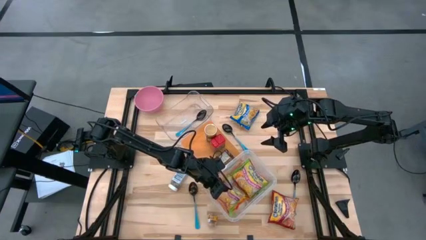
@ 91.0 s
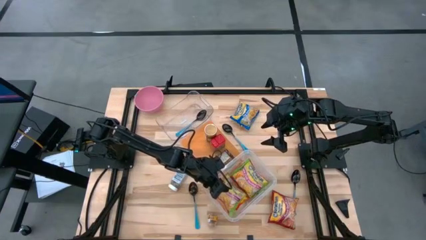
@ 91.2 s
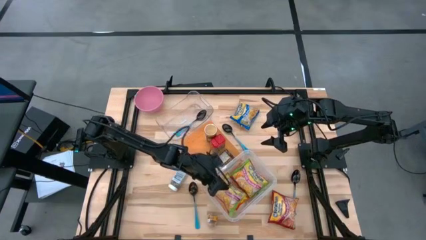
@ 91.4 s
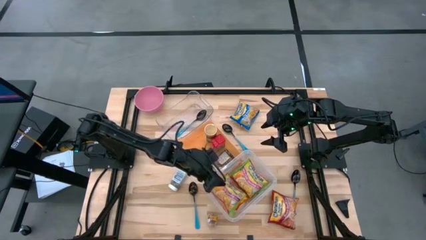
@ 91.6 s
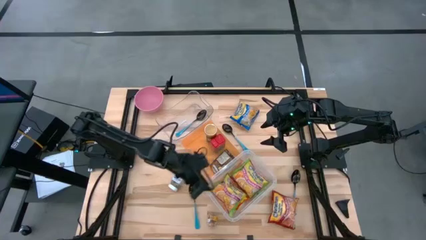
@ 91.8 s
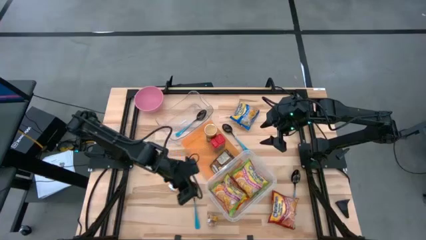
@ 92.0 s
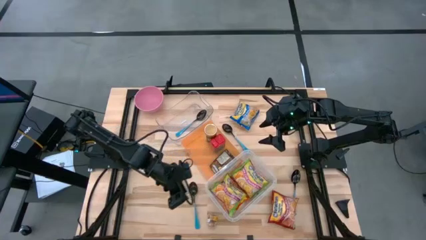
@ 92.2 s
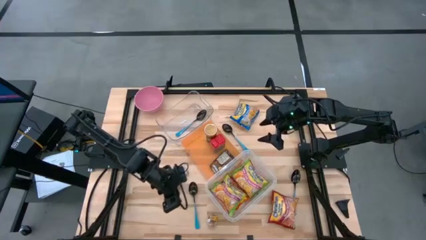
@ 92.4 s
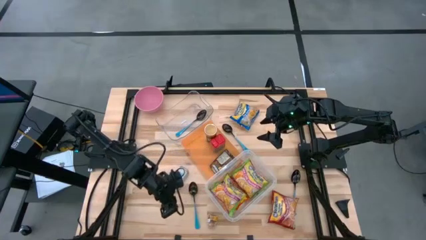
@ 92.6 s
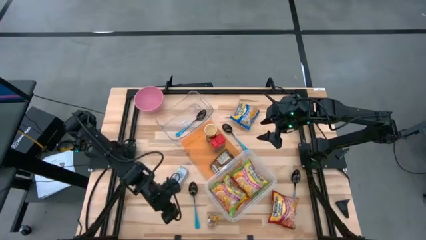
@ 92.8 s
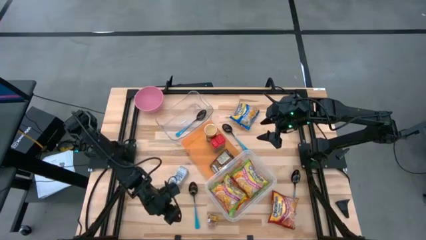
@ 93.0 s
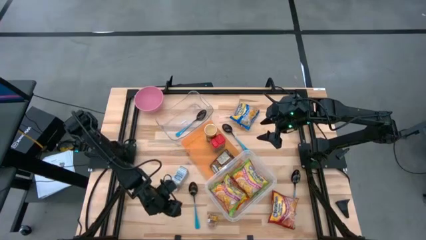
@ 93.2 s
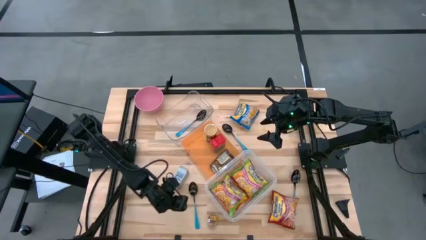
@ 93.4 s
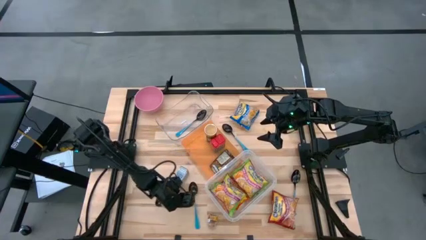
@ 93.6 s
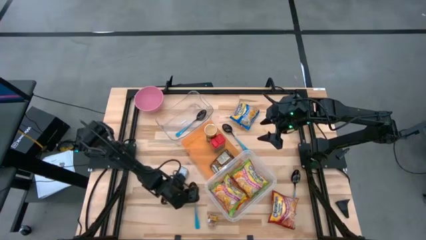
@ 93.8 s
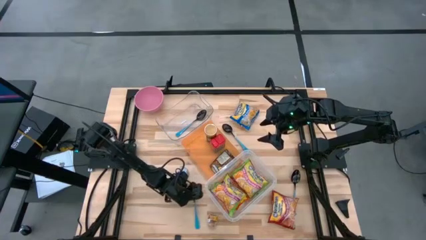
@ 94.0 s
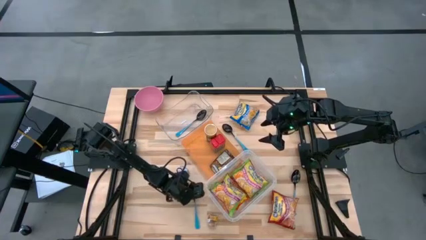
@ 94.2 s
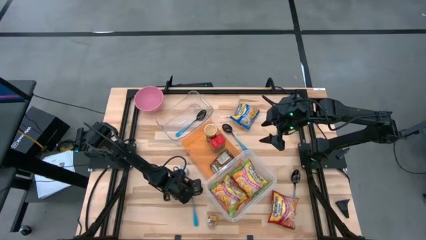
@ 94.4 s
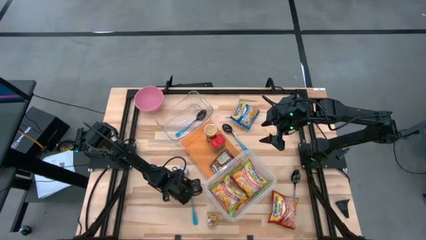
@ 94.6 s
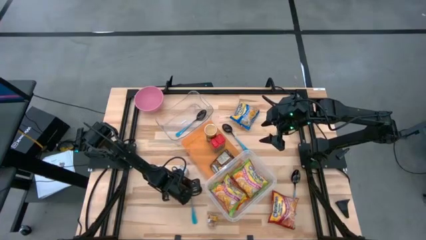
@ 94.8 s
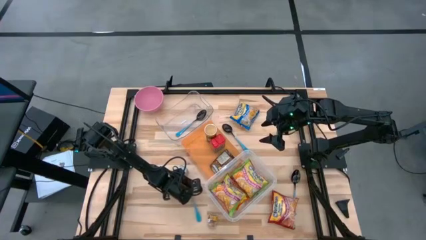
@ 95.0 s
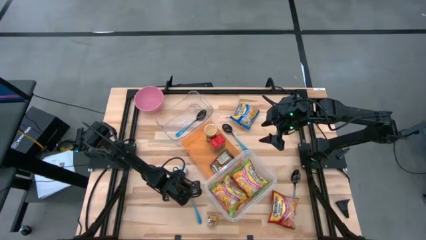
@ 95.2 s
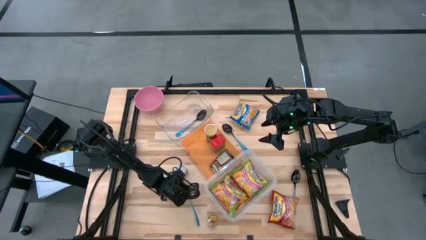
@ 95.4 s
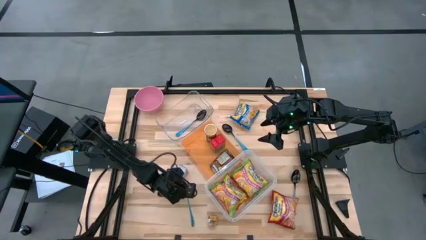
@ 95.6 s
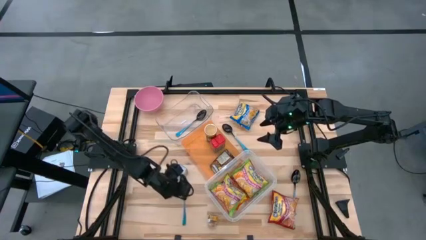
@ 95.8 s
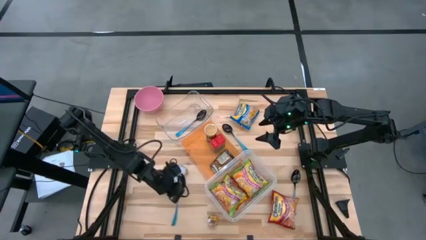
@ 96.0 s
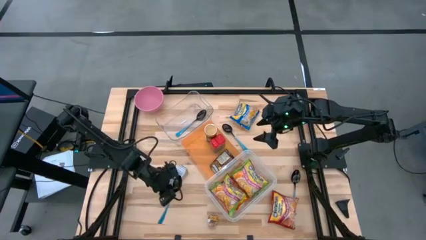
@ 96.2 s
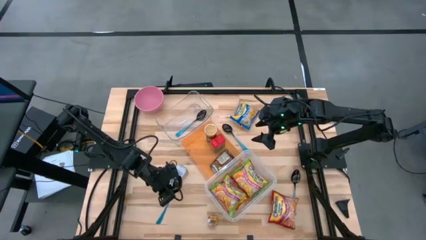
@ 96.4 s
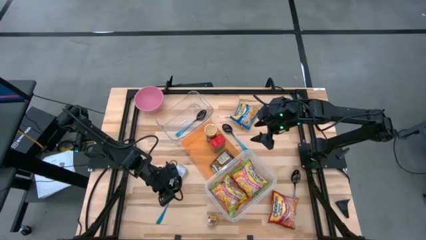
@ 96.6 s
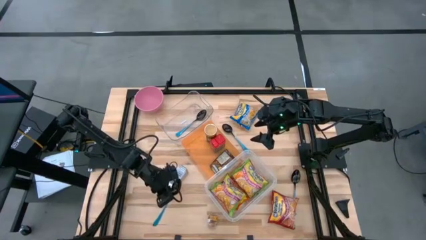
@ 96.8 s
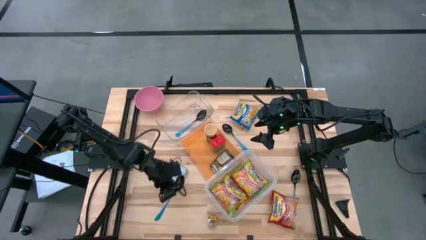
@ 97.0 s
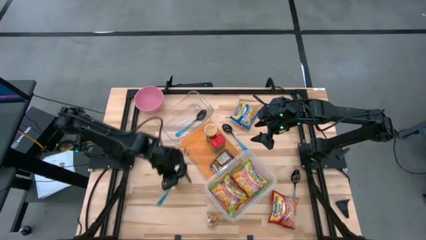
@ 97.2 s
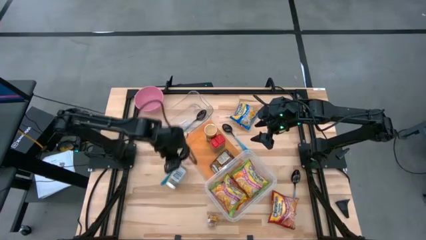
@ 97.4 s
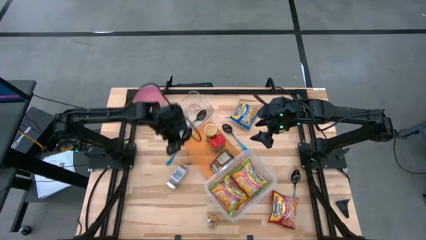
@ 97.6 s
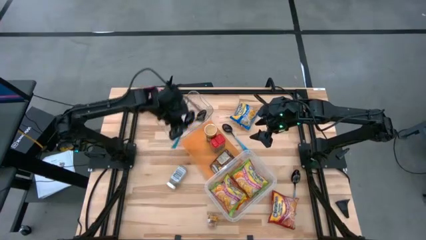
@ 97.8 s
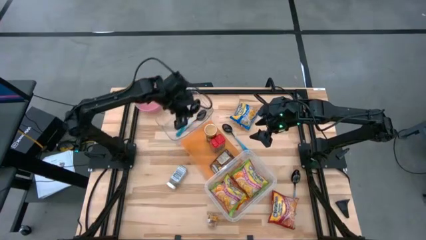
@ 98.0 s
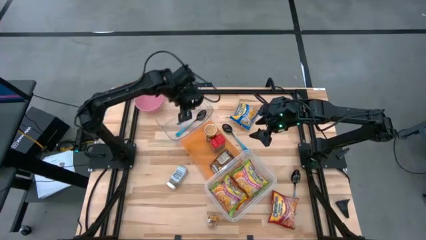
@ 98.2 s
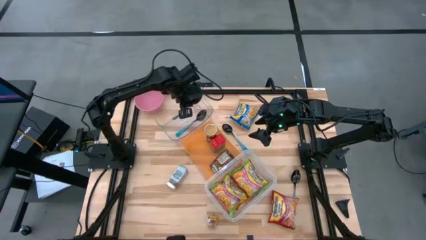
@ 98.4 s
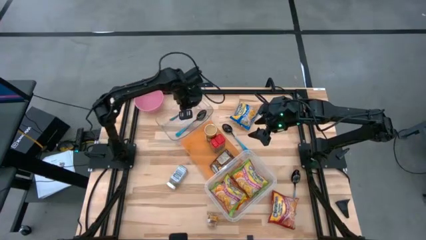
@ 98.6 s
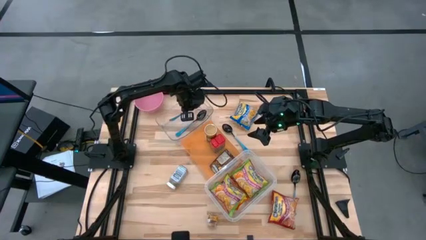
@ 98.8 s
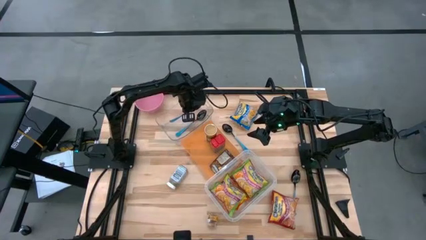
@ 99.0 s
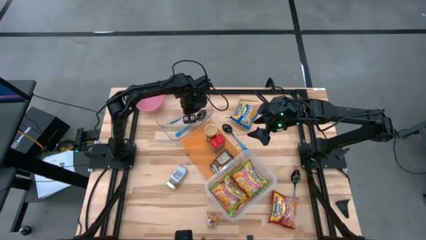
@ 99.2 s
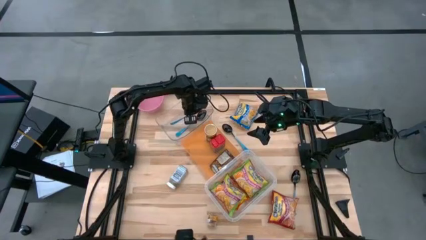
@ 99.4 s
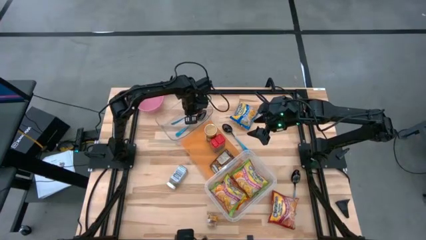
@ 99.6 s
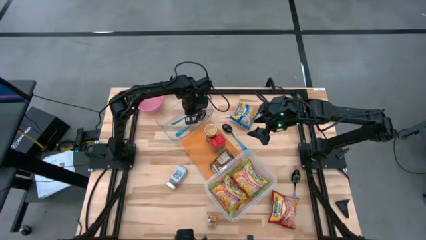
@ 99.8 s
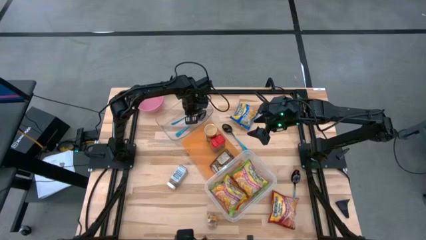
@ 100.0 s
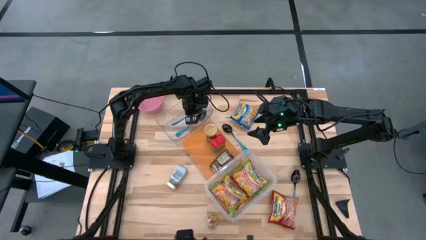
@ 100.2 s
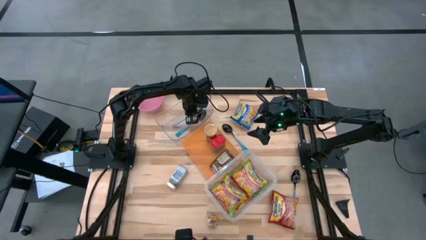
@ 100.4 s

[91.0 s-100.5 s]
Task: Pick & Place Food Item
Put the blue spoon into the top transparent bin

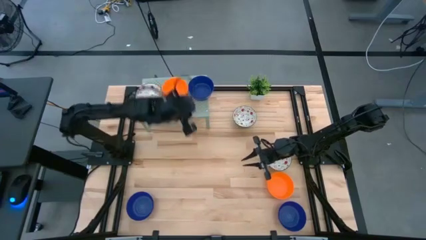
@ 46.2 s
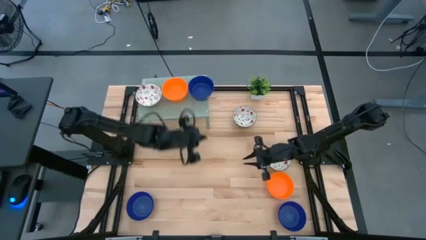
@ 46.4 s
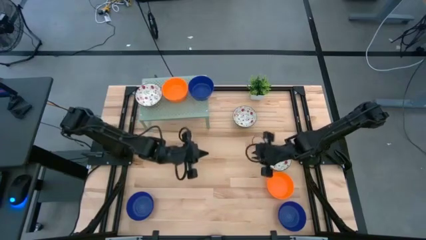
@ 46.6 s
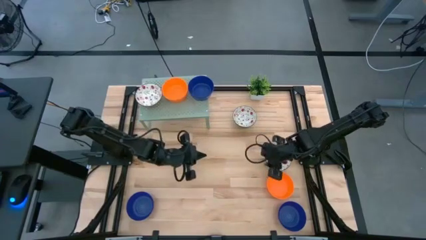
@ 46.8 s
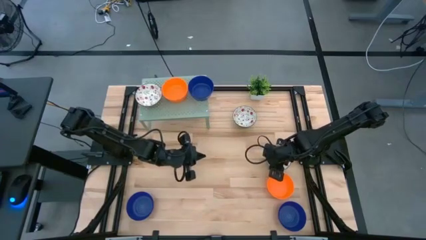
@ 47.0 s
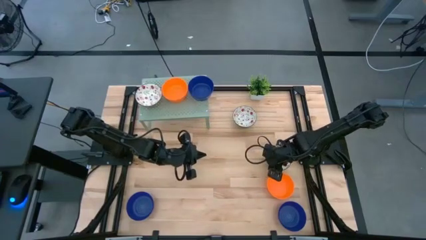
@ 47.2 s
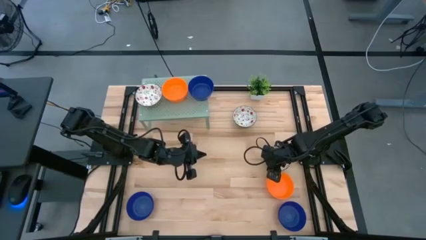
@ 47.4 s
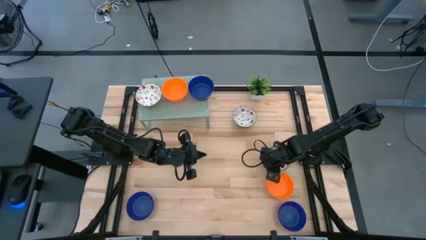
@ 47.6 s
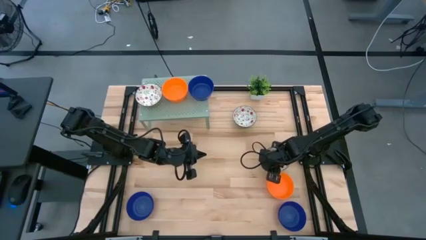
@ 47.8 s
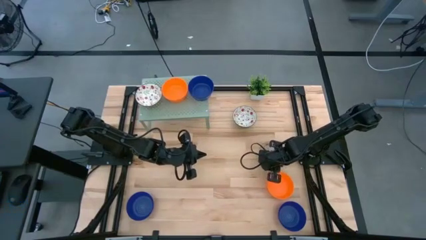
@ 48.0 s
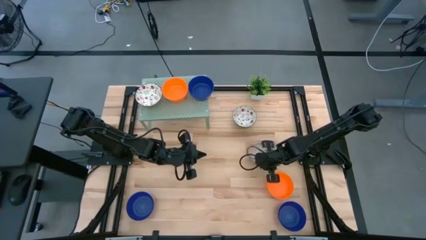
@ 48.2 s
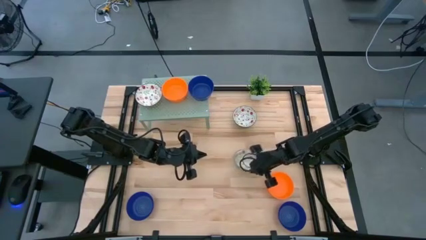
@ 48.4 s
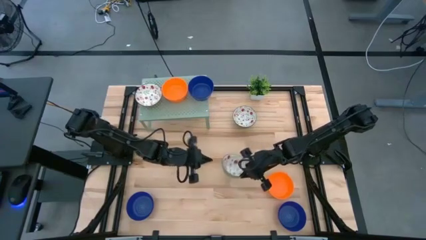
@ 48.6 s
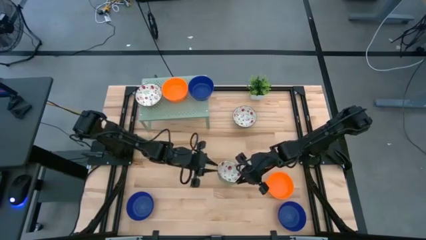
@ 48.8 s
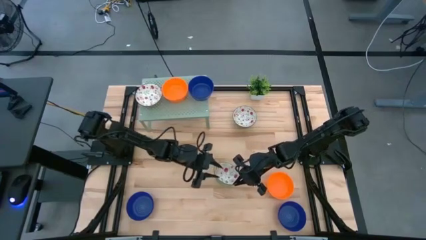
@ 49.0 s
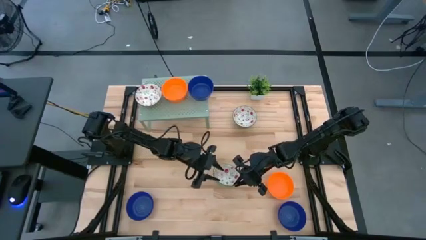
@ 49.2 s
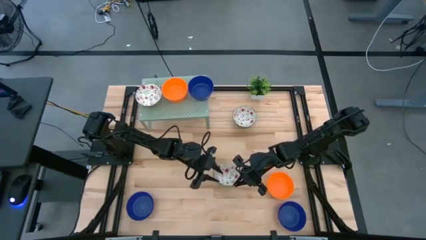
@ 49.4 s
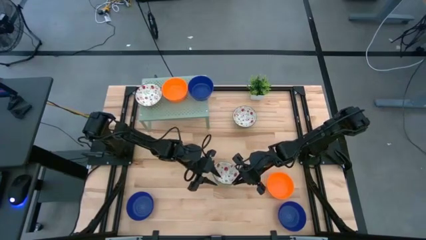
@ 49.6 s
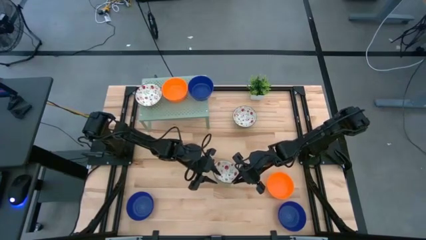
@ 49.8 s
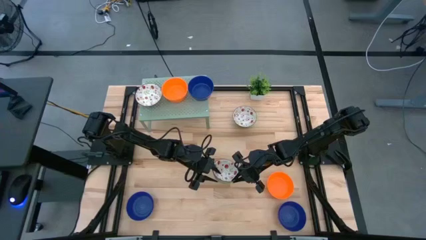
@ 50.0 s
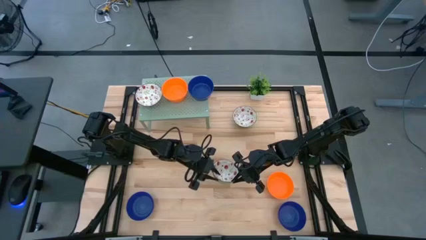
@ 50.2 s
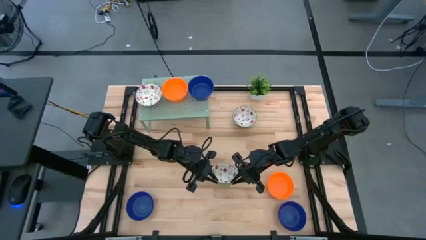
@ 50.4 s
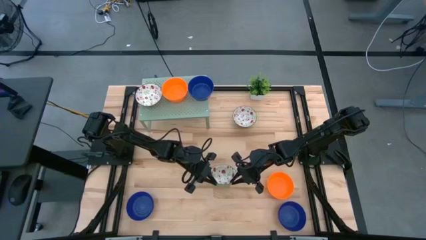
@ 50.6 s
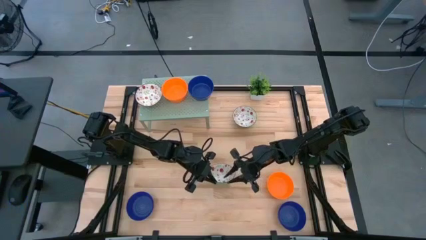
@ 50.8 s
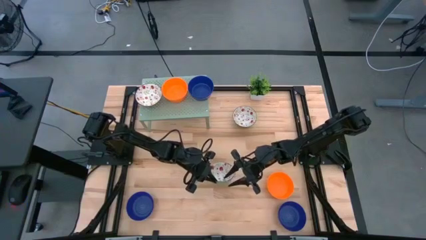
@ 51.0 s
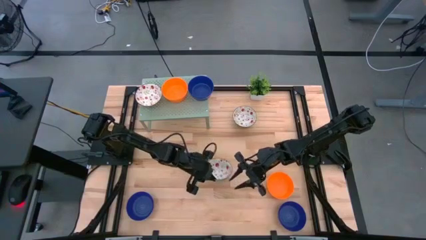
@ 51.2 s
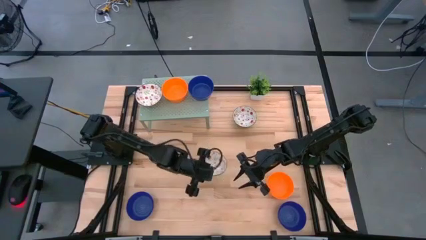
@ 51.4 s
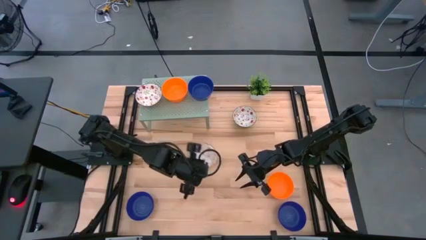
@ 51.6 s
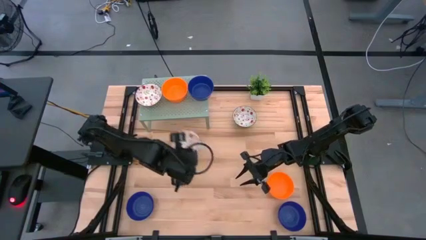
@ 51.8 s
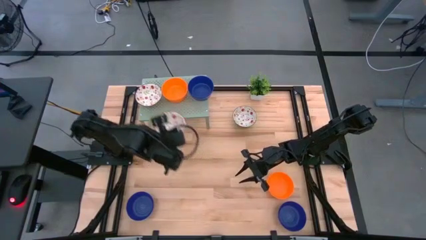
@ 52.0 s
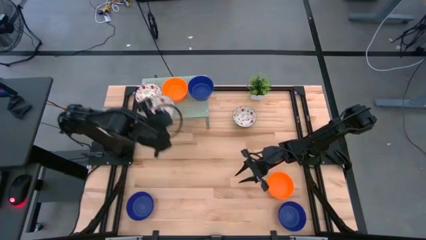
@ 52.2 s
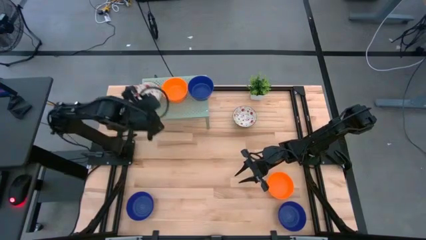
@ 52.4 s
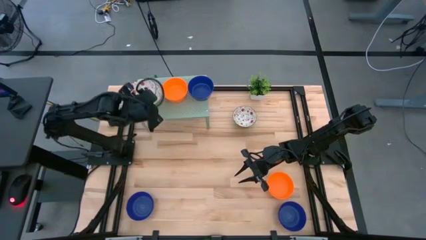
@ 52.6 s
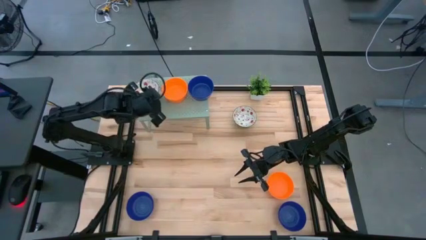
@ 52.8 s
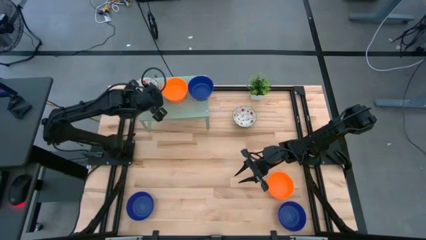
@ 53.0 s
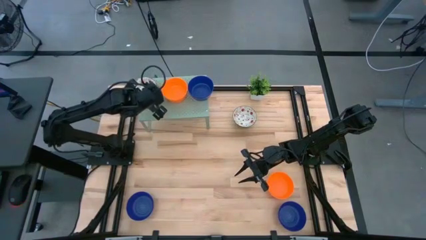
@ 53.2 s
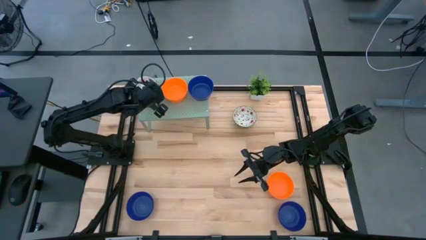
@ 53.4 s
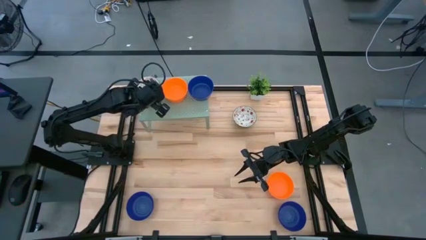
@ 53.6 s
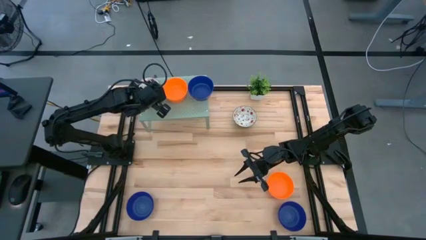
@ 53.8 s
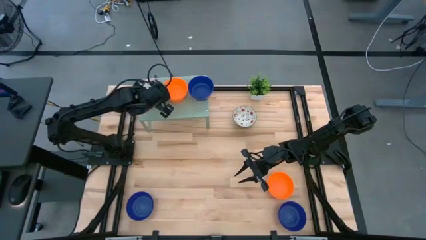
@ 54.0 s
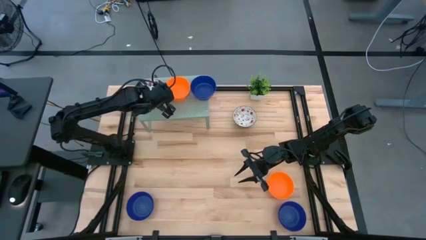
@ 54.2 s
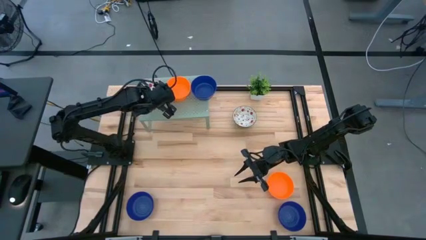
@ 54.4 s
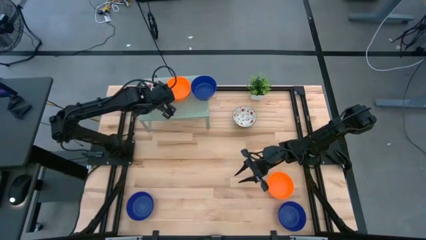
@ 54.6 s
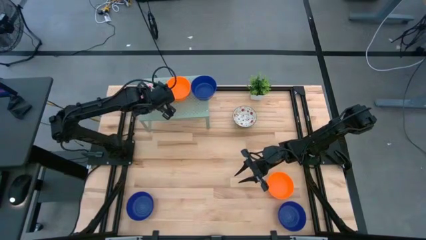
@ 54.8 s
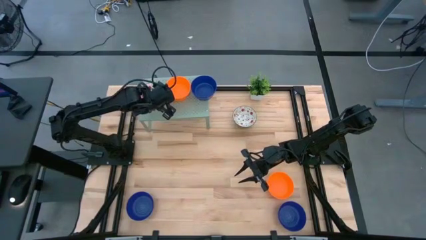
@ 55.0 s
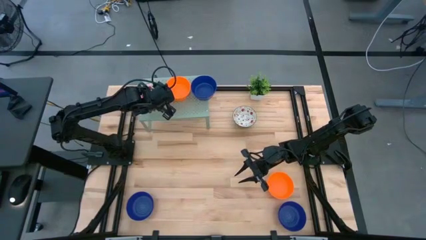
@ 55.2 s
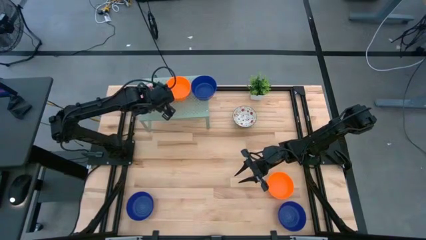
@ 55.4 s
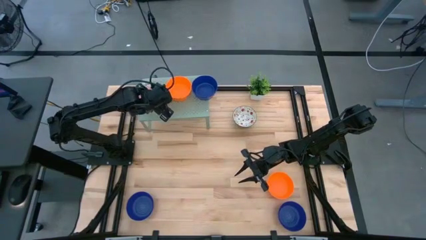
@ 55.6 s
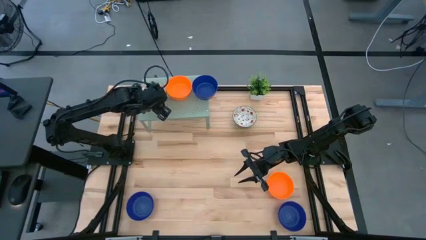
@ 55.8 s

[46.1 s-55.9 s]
Task: Pick & Place Mini bowls
Stack the white patterned bowl on top of the other white patterned bowl on the shelf
